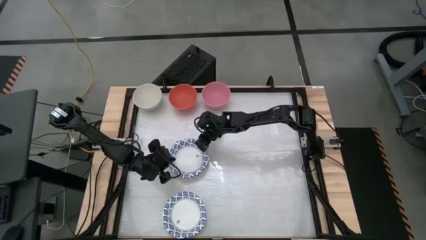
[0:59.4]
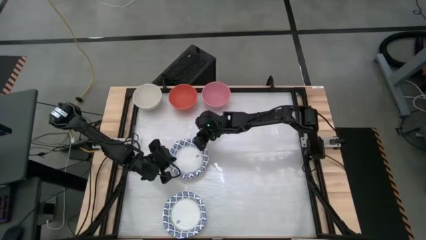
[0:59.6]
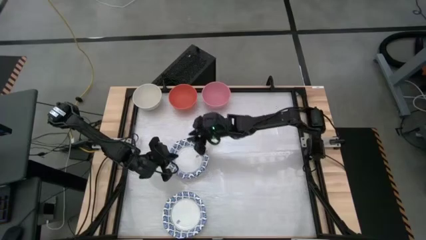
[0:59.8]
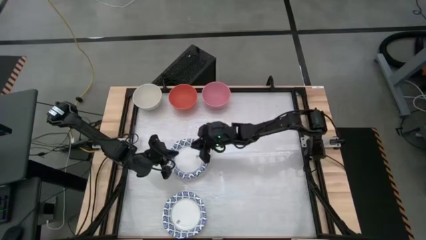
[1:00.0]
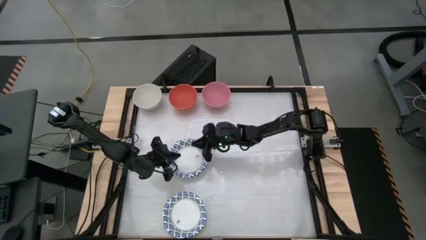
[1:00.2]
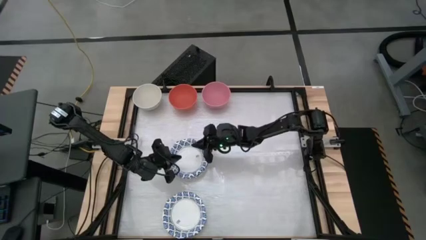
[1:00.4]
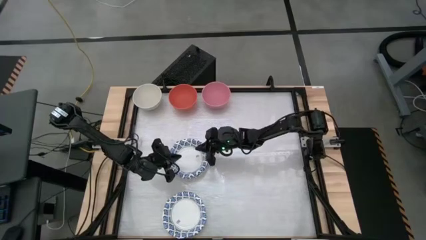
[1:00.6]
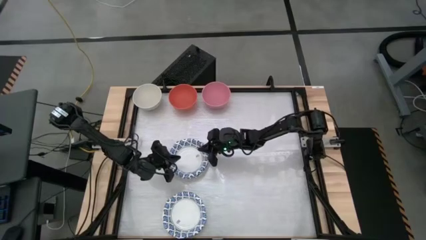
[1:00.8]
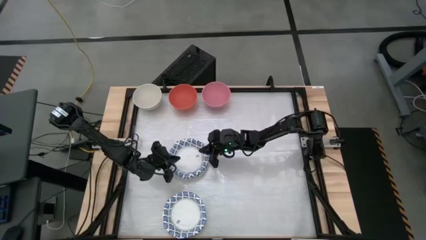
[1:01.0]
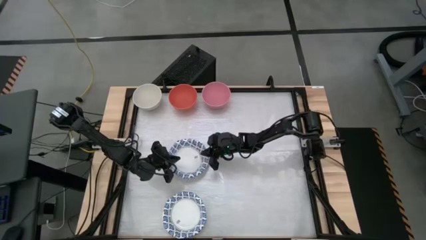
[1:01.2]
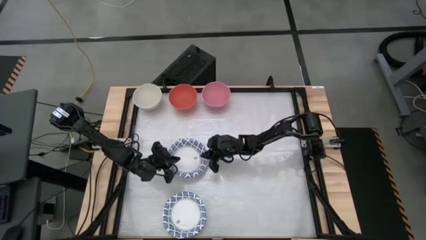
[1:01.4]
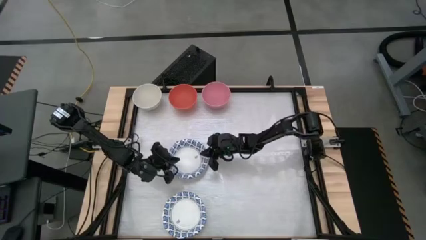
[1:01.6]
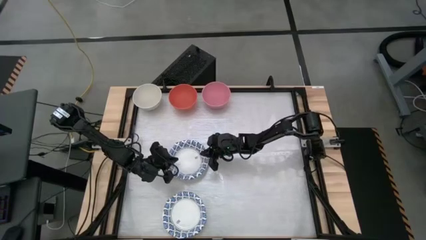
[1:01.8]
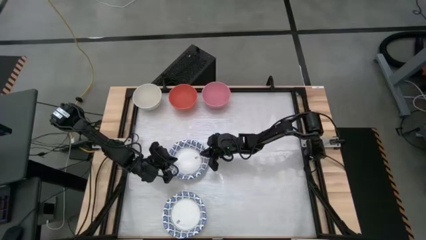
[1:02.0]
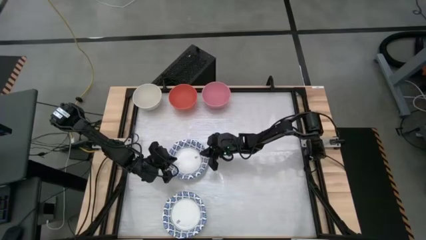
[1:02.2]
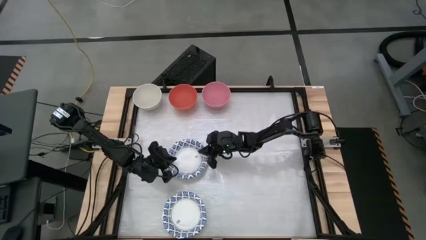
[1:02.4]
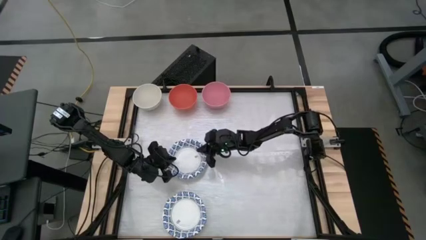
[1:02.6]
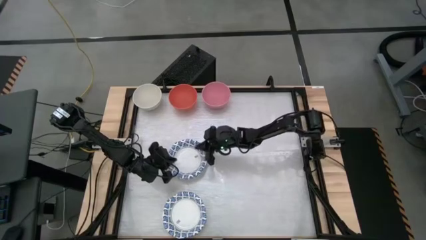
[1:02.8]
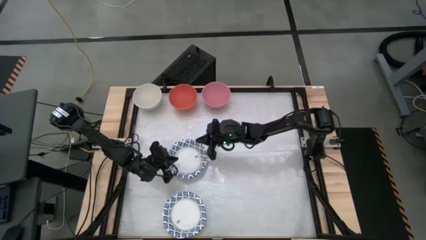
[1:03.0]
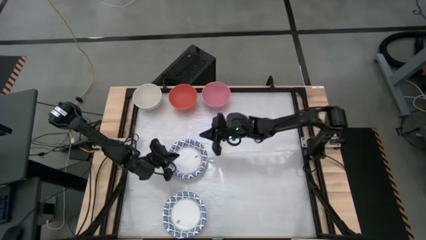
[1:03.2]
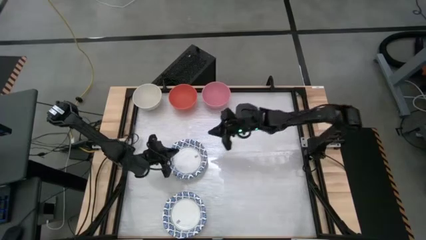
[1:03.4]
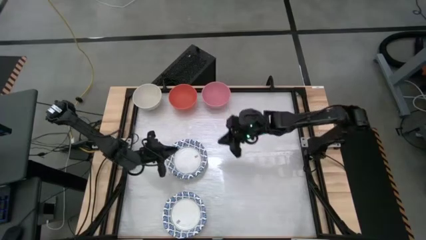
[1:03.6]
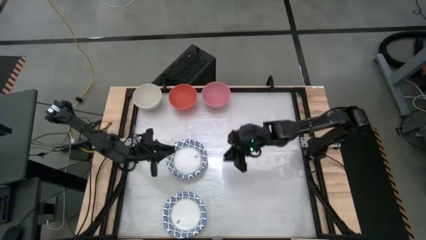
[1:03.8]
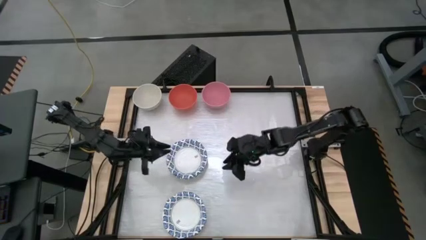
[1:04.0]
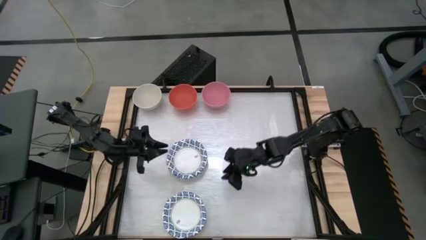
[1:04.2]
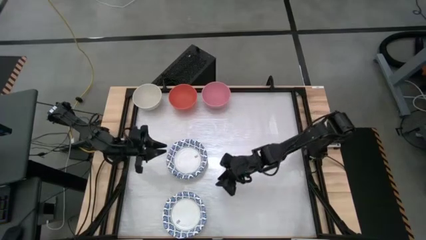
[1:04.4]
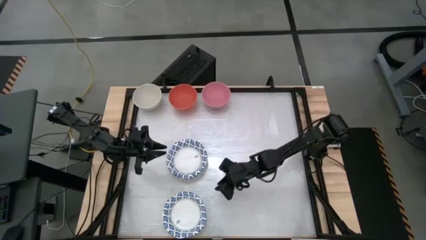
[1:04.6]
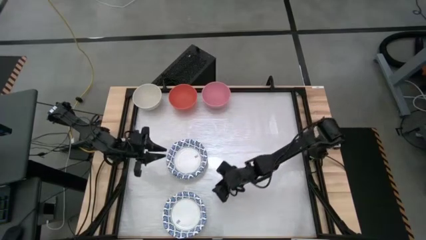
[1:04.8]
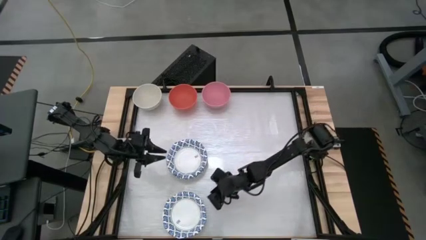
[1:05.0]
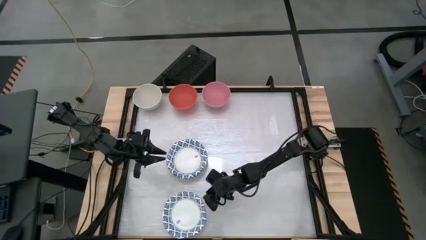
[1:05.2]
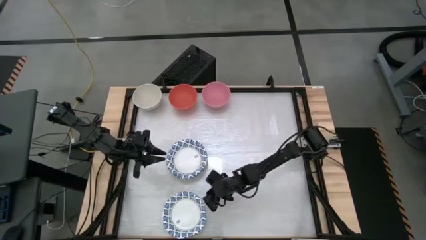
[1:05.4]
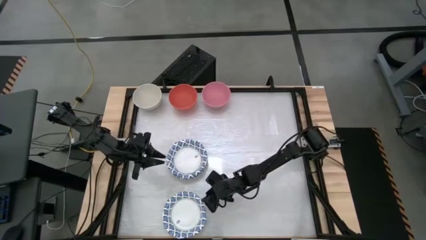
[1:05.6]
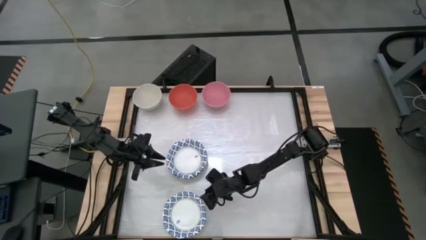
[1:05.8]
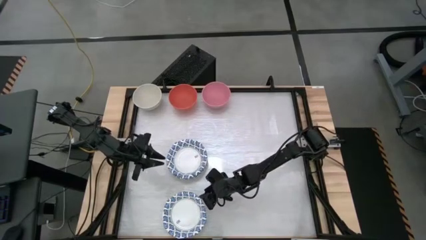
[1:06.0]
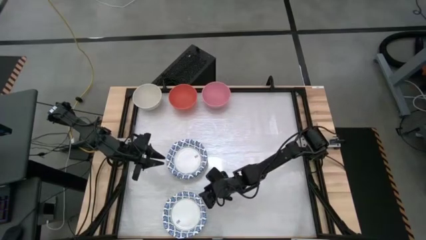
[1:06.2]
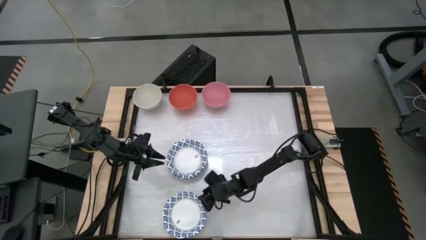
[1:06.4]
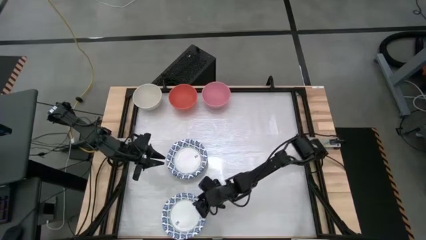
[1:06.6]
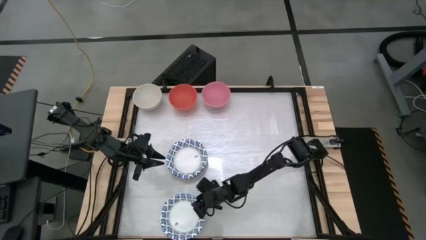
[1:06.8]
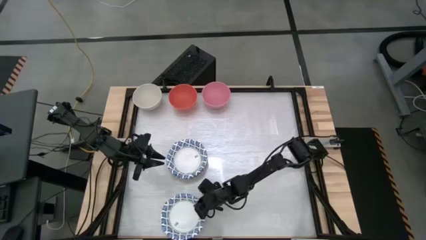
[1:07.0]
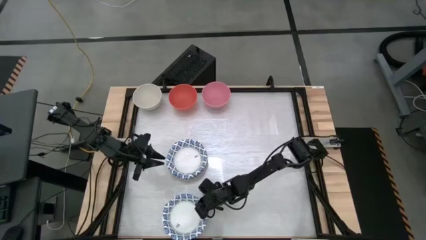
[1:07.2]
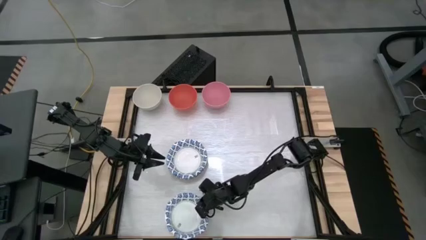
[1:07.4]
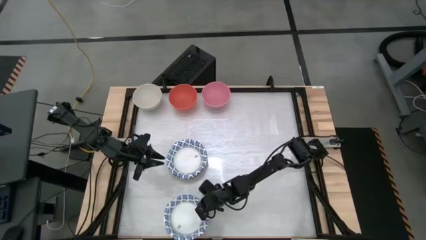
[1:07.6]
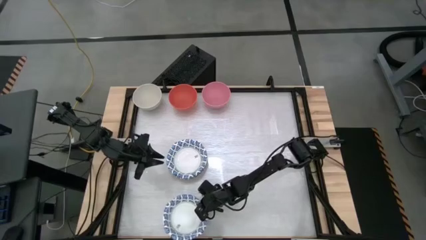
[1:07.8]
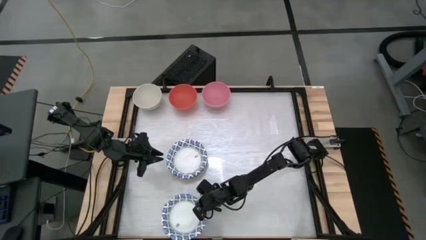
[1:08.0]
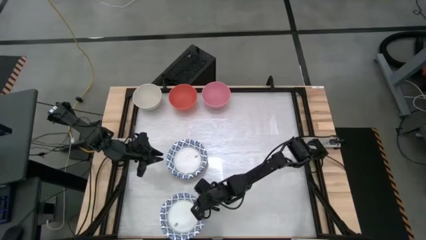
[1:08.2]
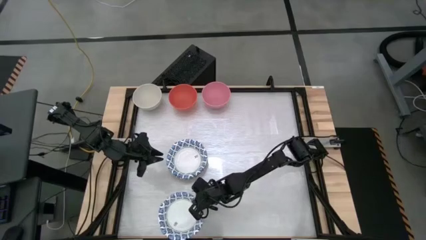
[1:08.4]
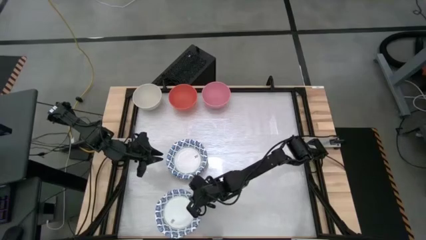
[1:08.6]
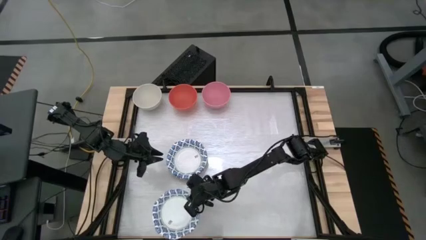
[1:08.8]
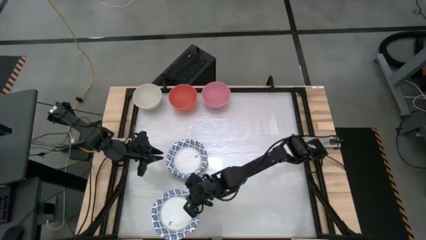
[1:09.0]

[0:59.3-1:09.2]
Task: Nest bowls inside each other by size order
Stack the white patterned bowl on top of the white patterned bowl

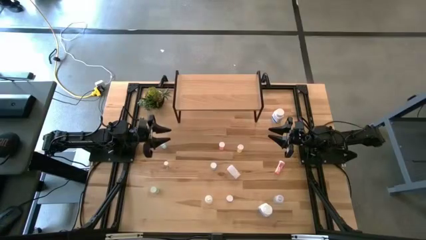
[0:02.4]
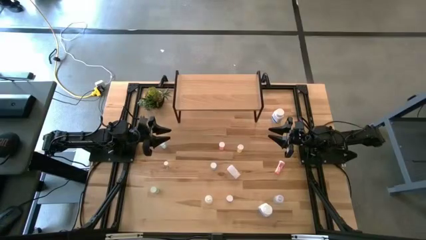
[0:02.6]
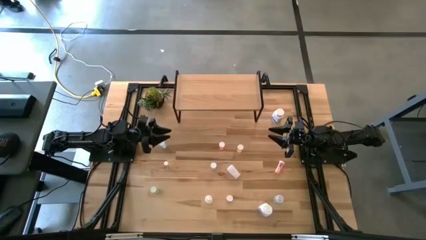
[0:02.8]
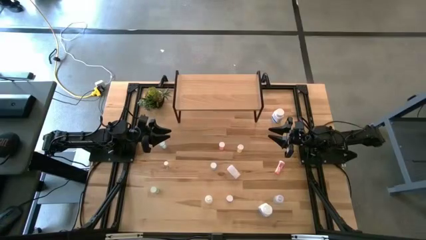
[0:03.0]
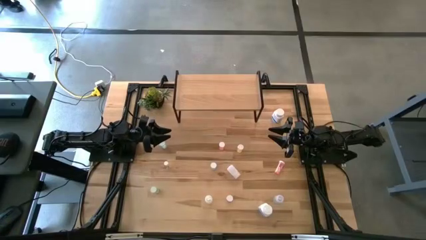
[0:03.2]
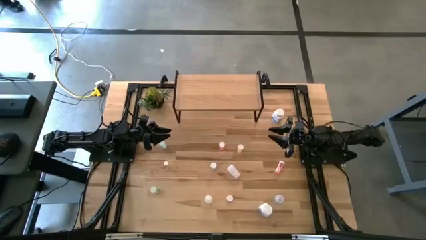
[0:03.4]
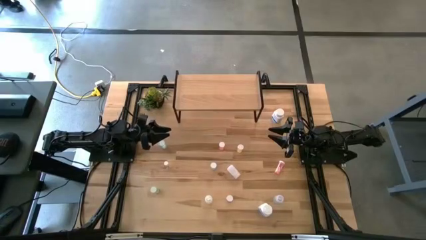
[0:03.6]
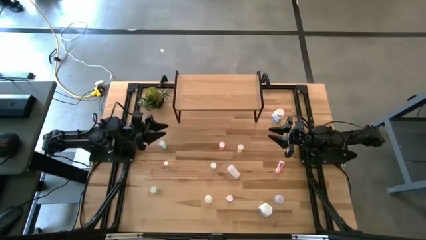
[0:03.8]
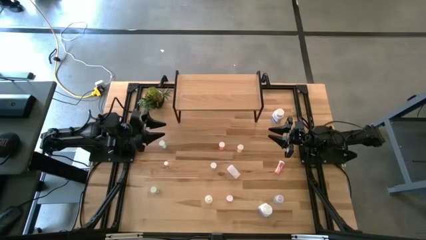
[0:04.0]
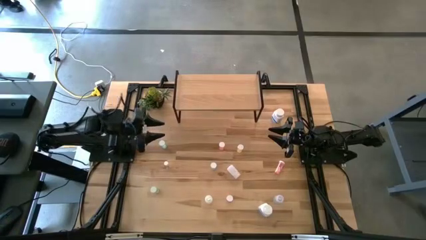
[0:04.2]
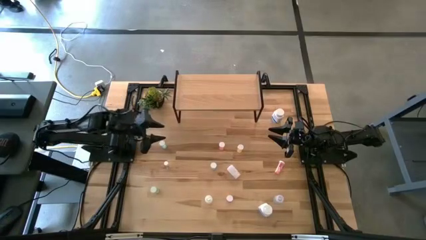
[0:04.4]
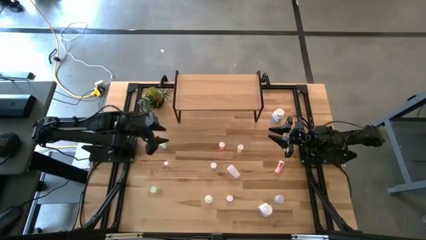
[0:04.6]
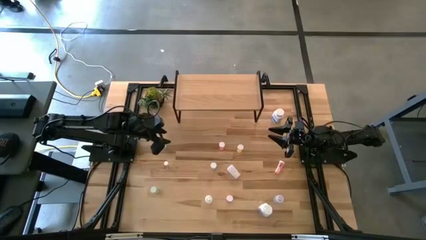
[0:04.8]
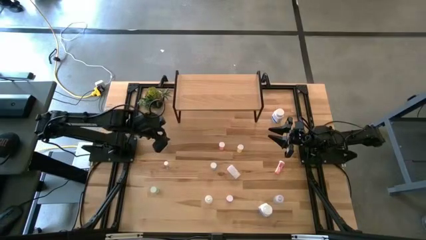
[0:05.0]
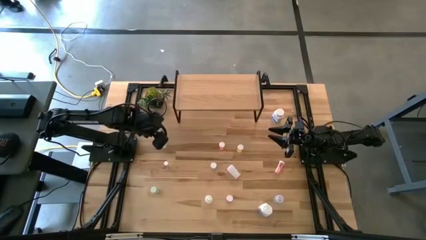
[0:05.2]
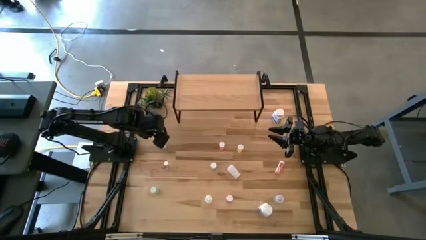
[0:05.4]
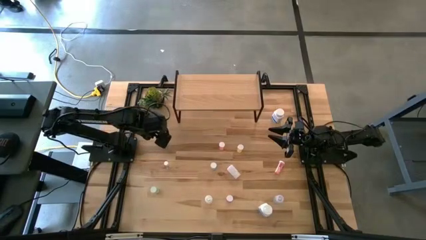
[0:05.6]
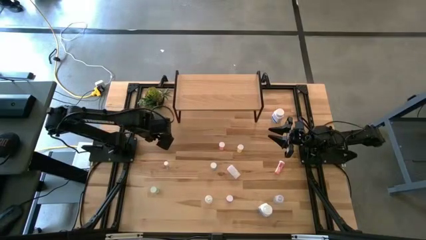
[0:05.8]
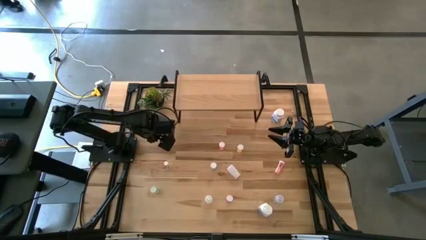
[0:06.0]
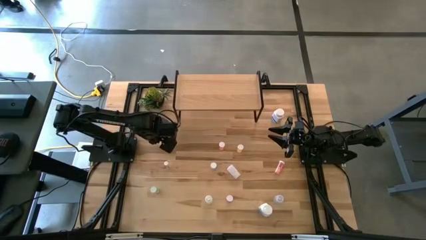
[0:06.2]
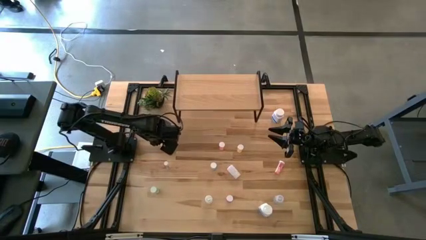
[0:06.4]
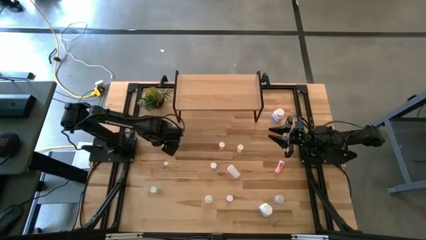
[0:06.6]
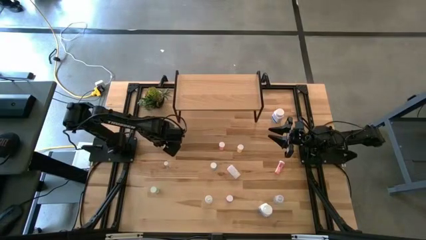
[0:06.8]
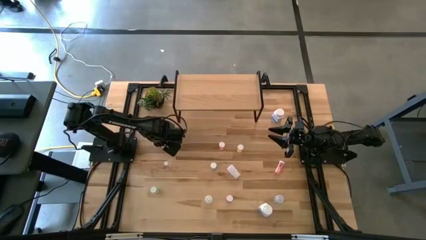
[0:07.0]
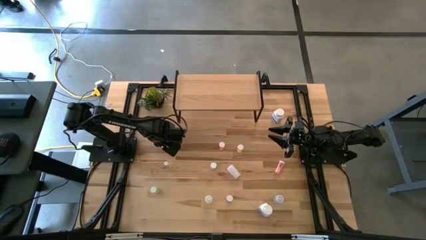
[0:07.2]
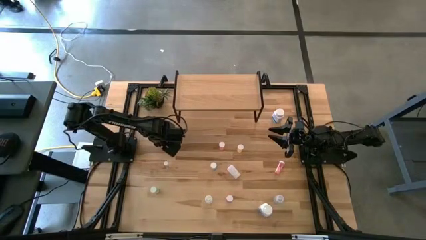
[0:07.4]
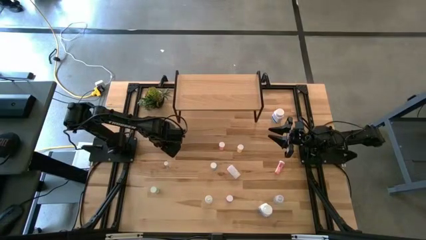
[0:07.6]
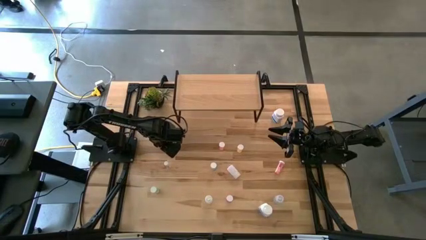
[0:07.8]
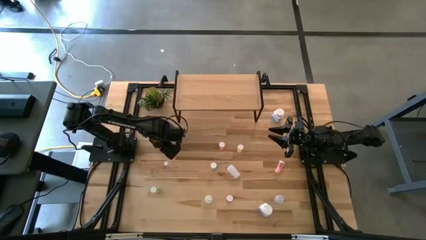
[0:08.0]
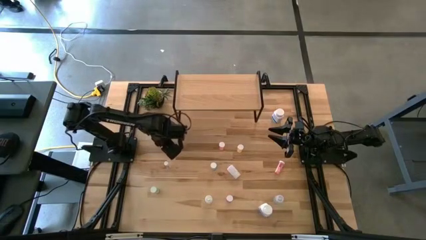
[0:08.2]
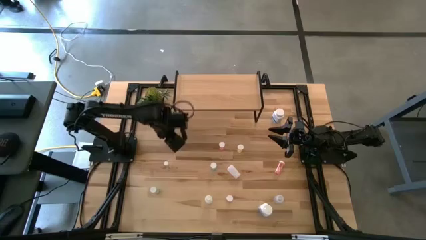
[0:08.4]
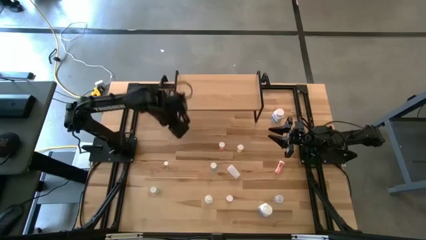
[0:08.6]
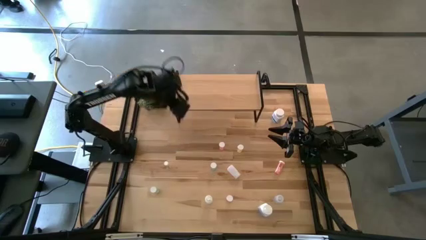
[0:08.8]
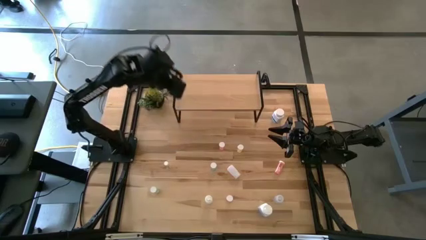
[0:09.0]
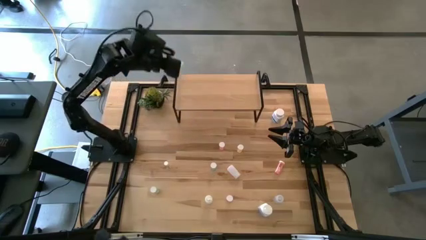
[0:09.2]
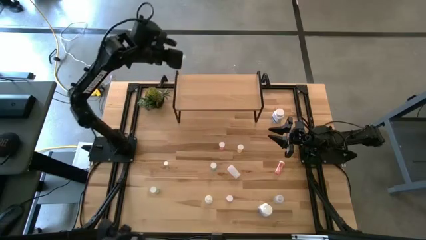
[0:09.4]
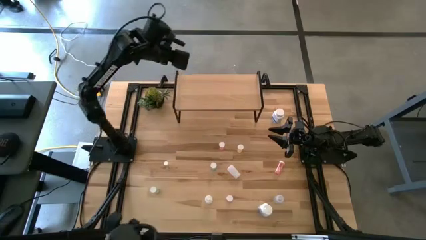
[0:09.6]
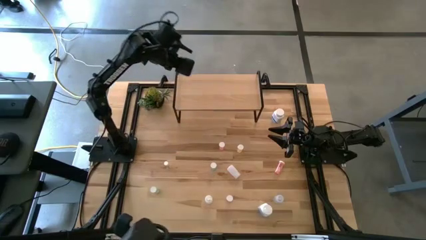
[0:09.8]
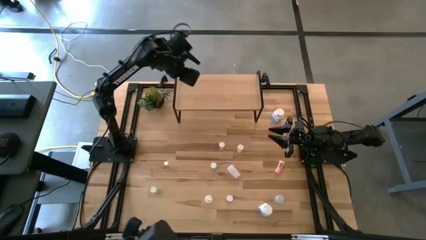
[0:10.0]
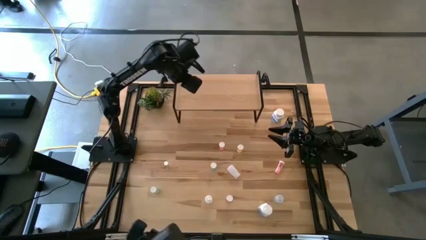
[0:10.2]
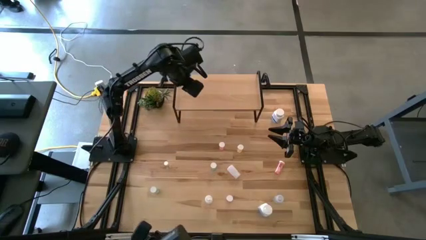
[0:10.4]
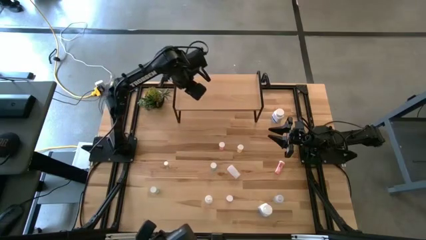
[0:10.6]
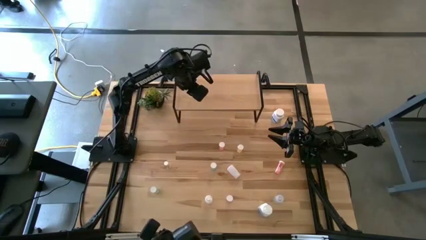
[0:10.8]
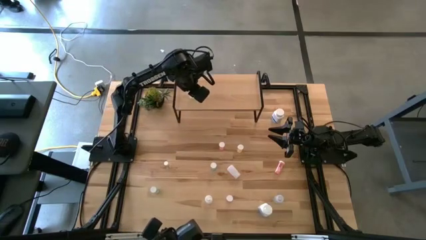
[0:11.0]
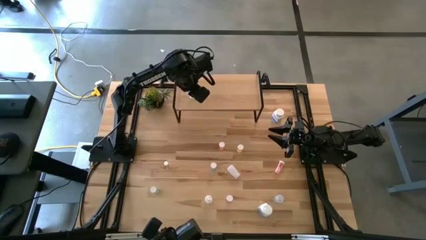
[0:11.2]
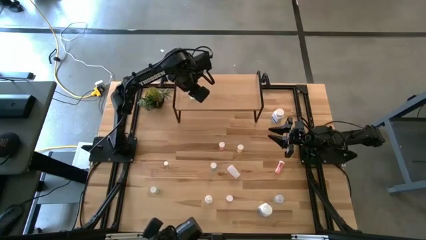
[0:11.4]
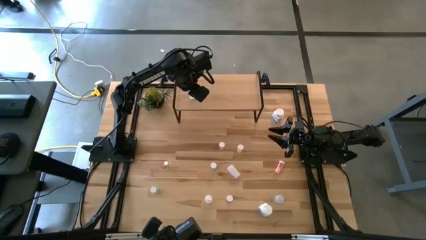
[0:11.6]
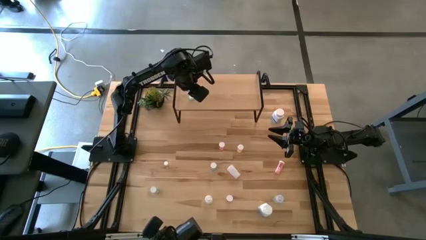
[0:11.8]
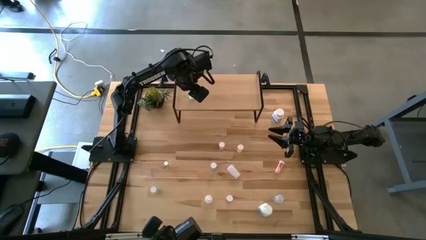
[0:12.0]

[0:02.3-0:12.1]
Task: Pick and place medicine bottles onto shelf by color
Put the top left green pill bottle on the shelf
